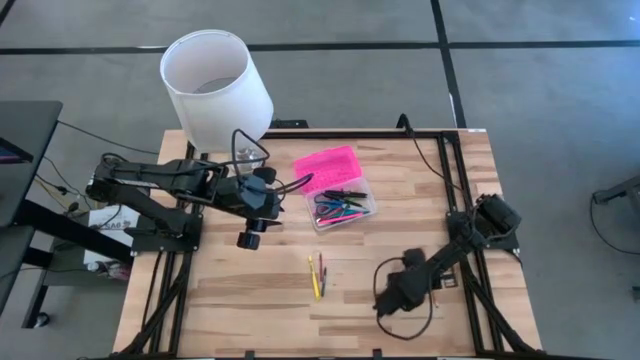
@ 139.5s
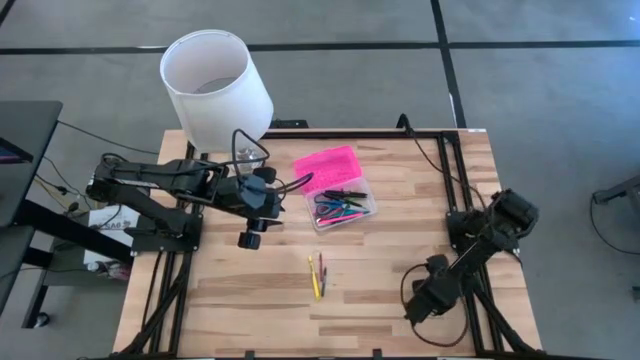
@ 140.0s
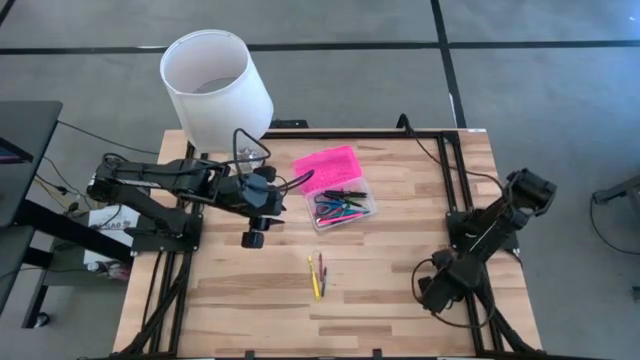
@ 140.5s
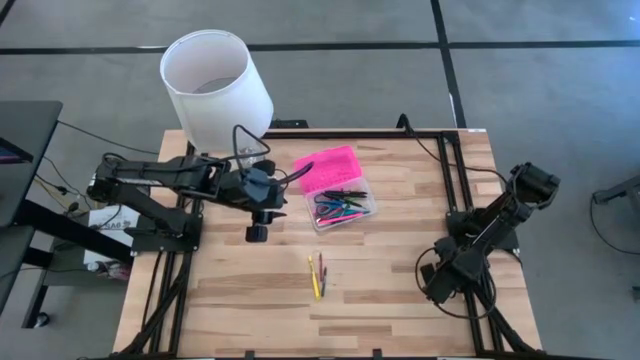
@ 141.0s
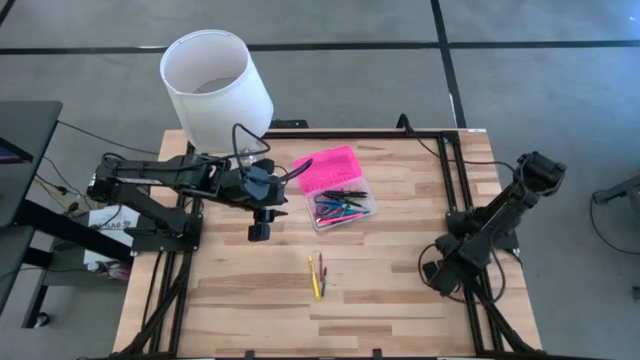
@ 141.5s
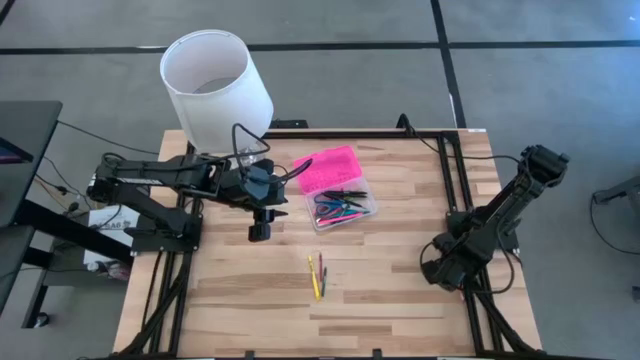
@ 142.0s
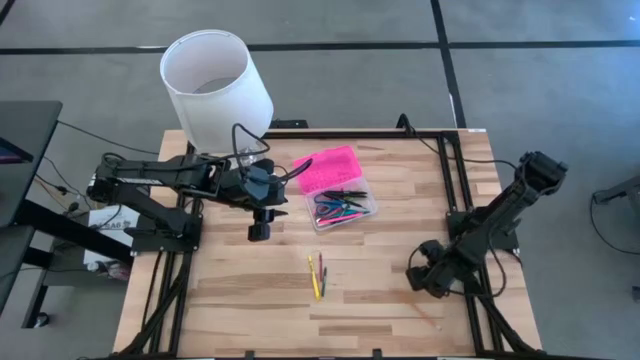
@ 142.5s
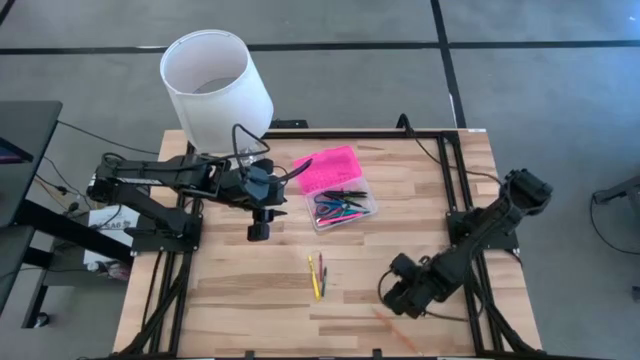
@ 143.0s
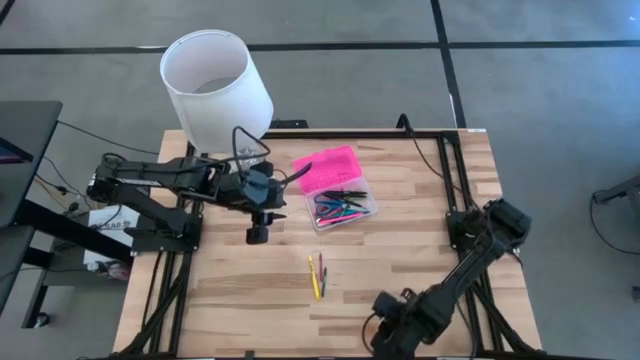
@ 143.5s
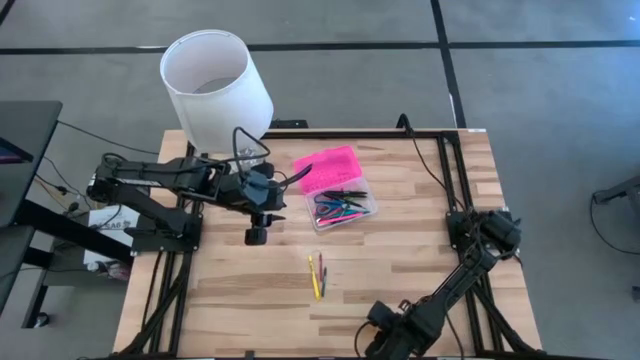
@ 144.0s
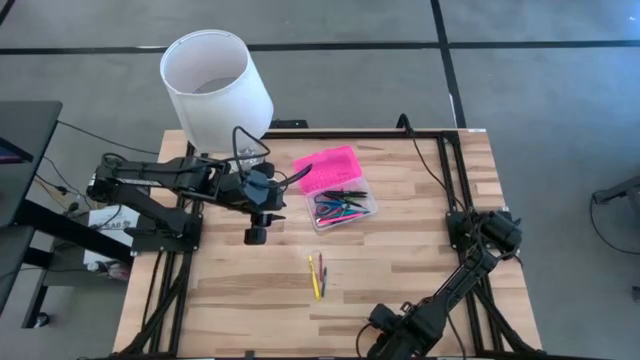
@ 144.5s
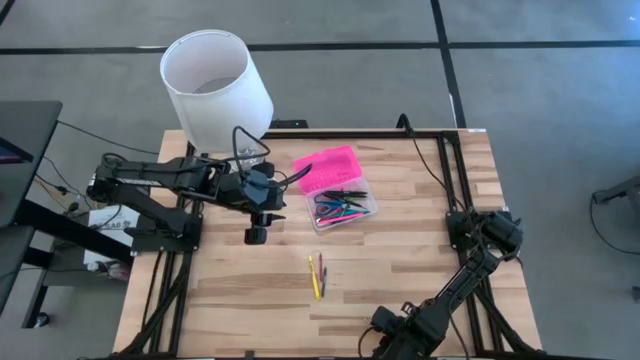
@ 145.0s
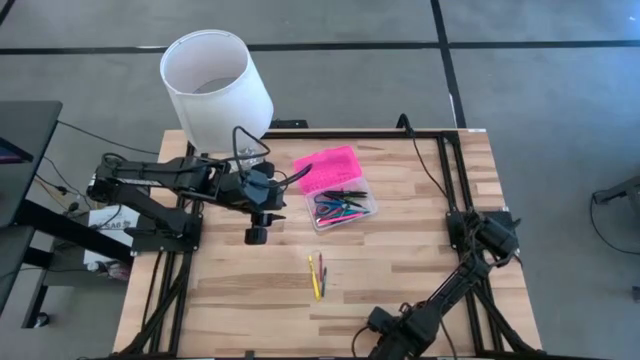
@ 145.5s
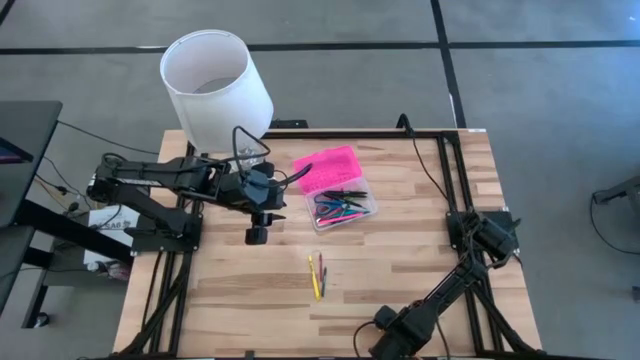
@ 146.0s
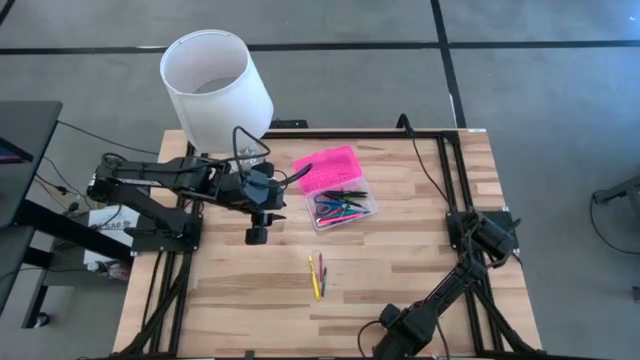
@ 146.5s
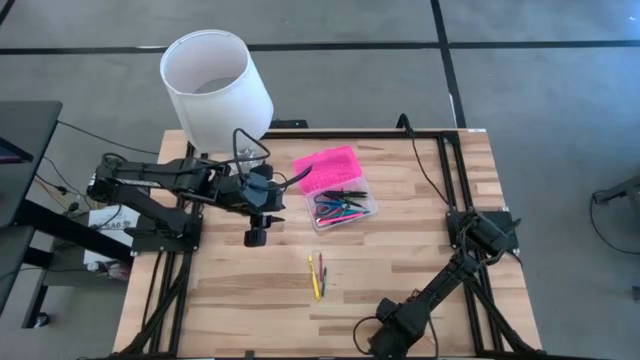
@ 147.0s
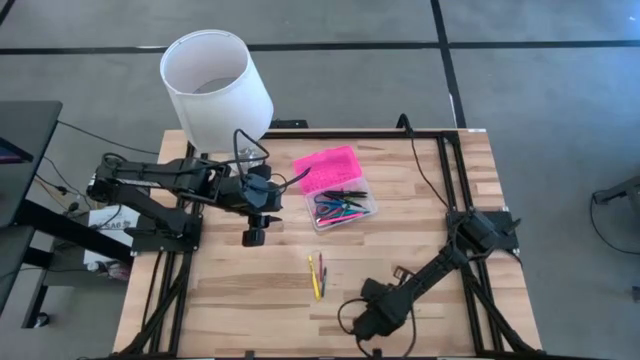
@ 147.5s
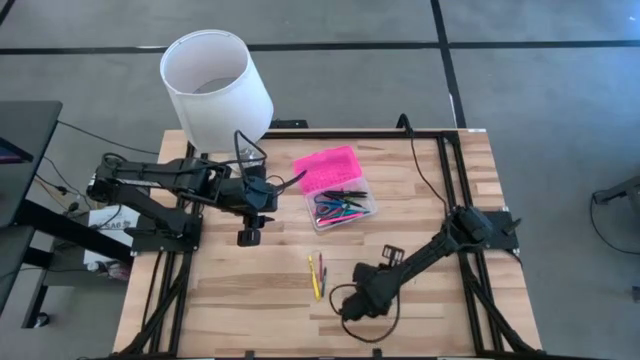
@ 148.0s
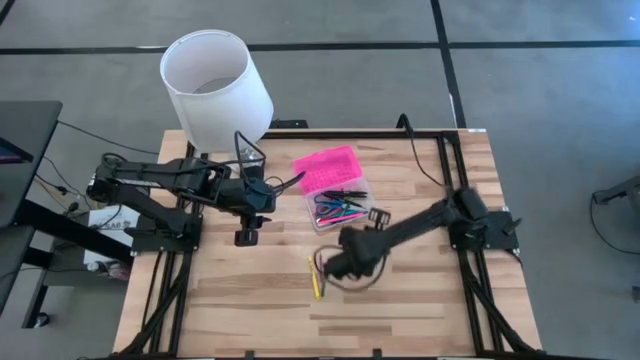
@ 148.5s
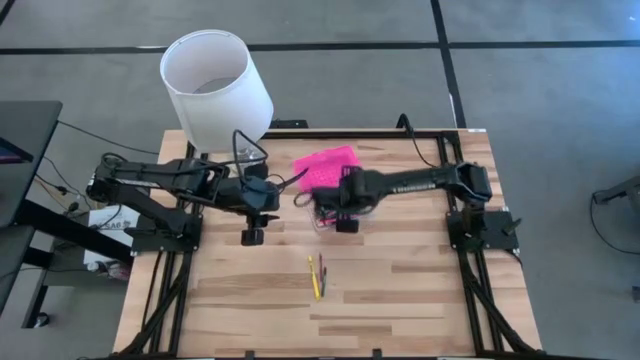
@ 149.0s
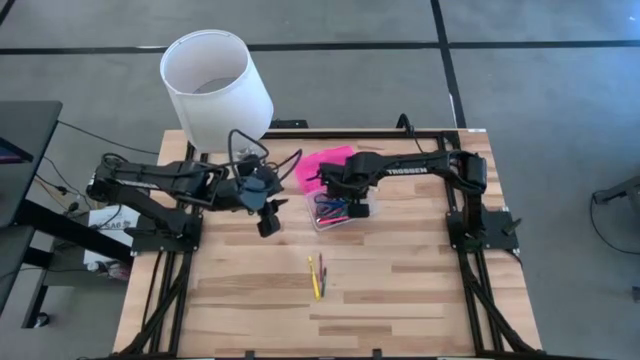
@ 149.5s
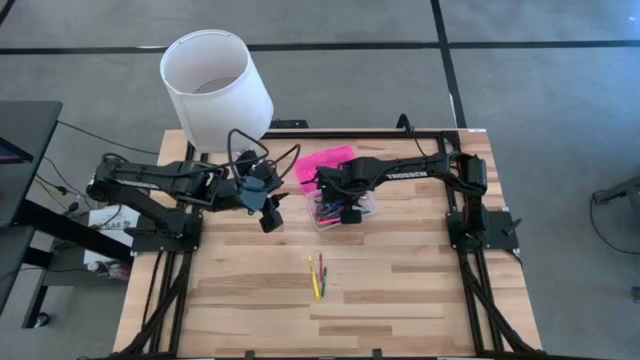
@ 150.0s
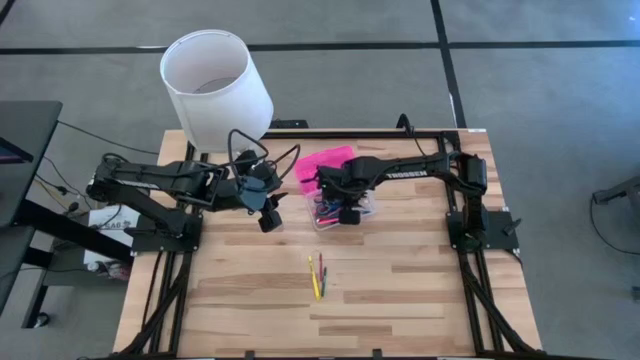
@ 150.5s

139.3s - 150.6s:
Task: Pick & place school supplies into a supply box
Put the yellow pencil into the pink supply box

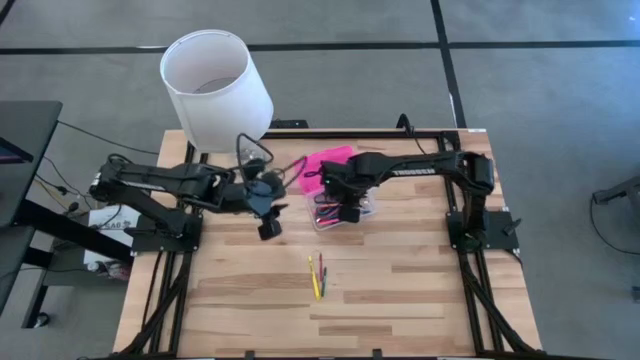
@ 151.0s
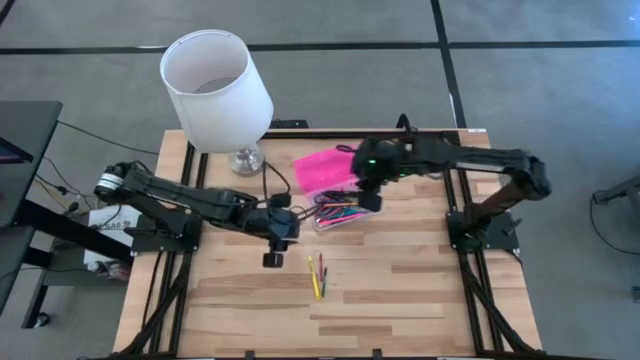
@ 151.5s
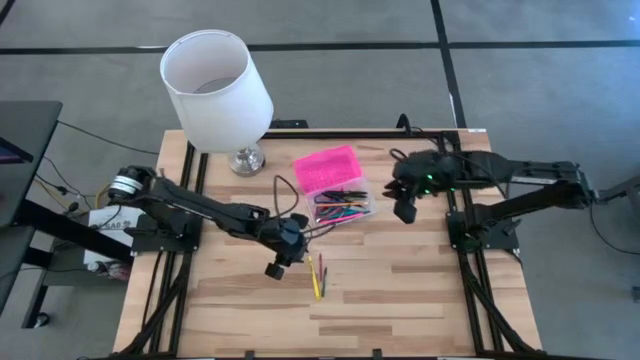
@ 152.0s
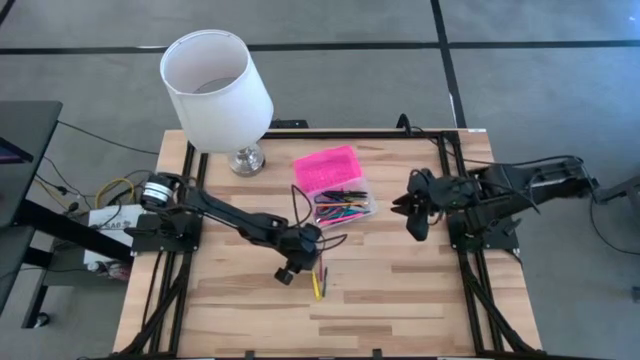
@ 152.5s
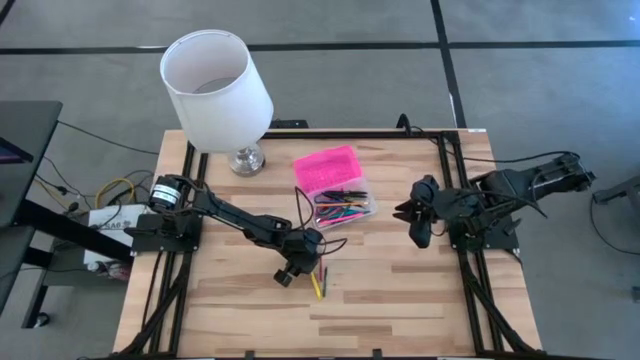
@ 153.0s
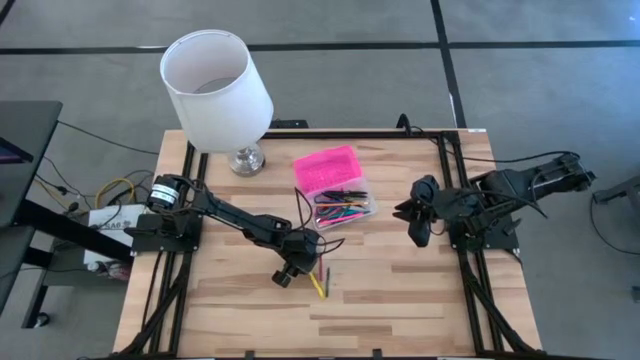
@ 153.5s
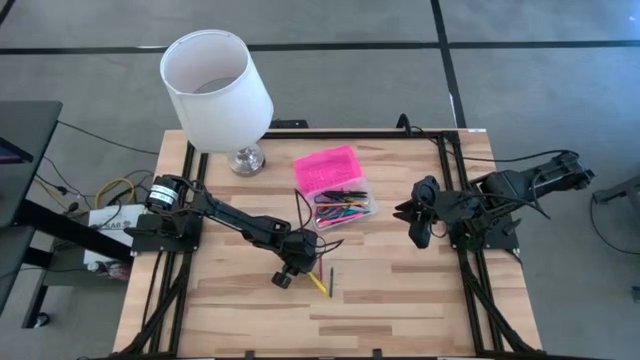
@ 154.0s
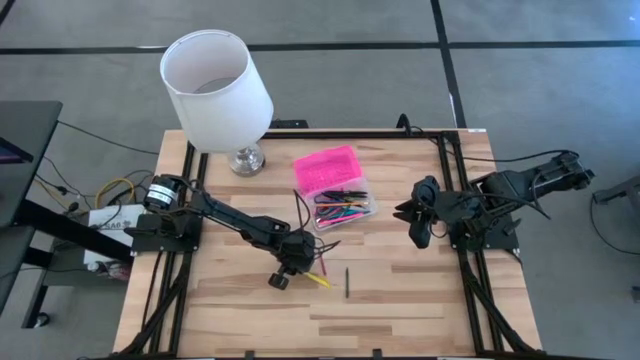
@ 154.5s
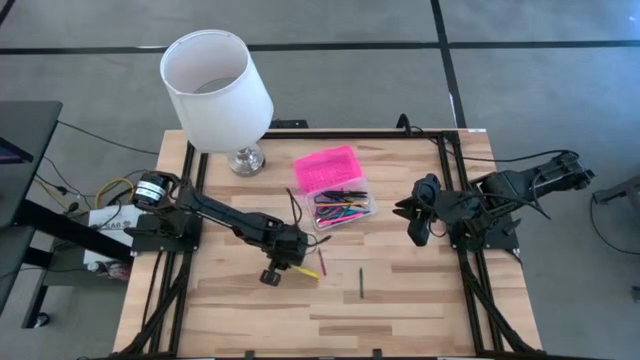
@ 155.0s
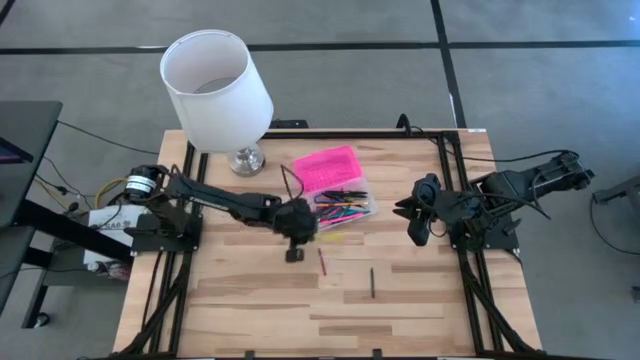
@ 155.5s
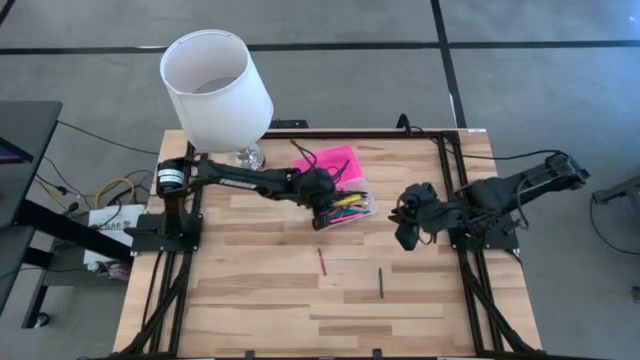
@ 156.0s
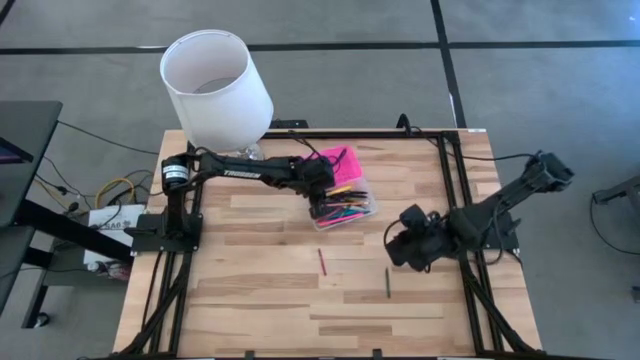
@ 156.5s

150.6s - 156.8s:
Put the yellow pen into the pink supply box

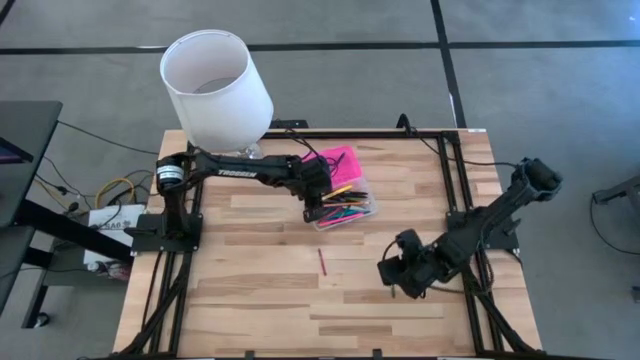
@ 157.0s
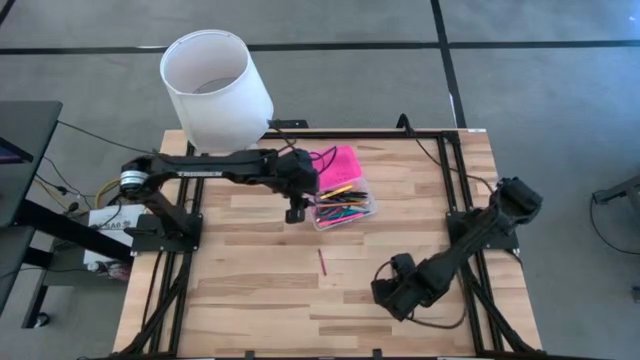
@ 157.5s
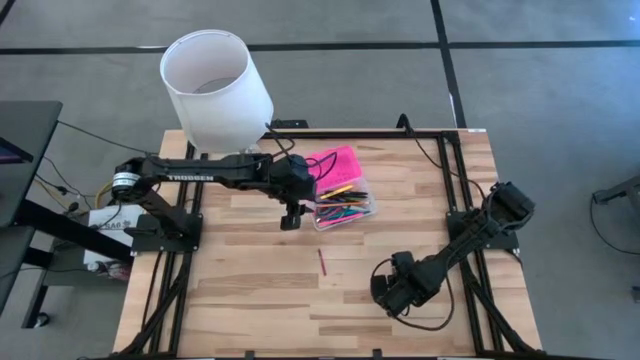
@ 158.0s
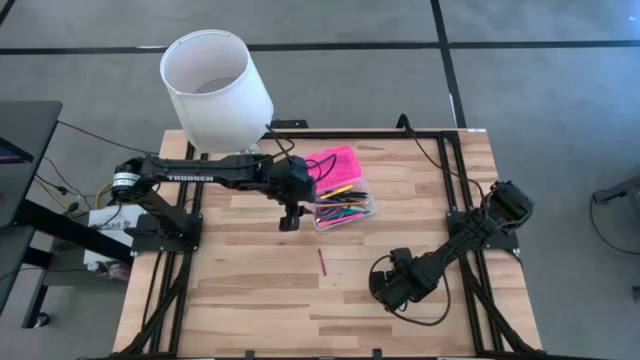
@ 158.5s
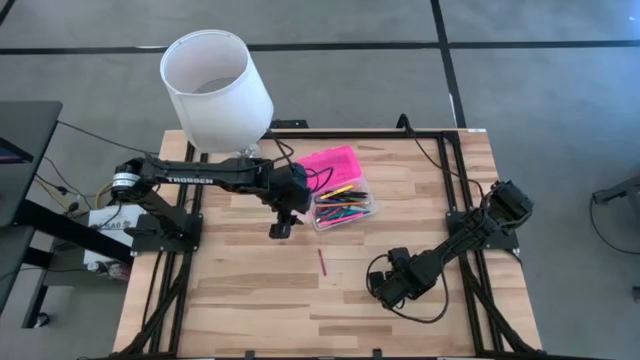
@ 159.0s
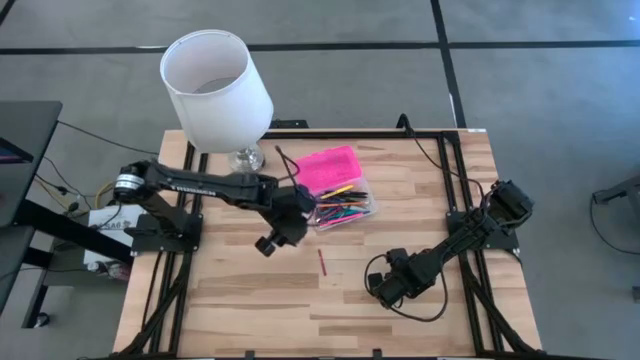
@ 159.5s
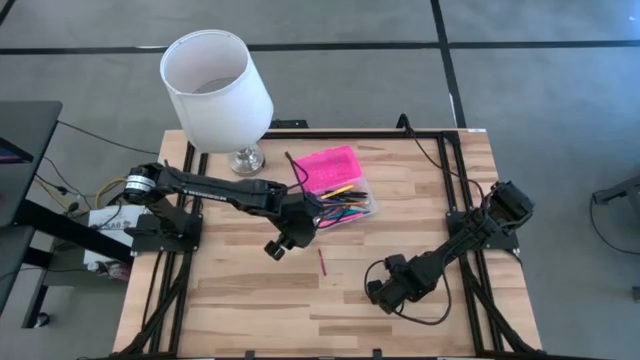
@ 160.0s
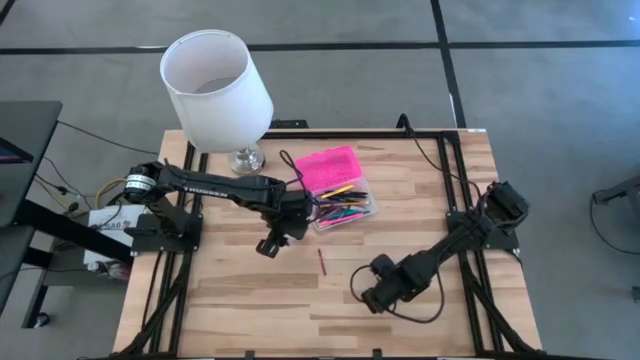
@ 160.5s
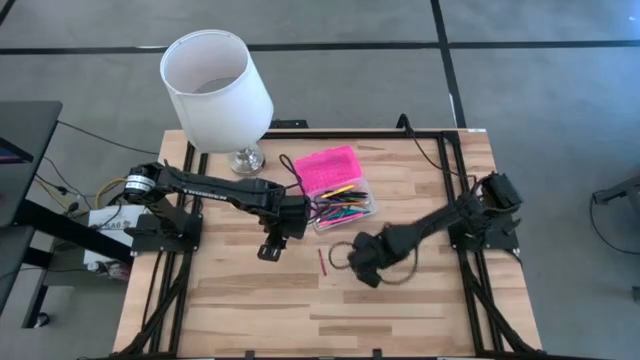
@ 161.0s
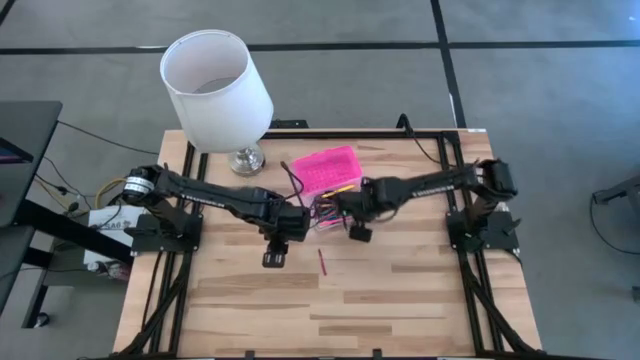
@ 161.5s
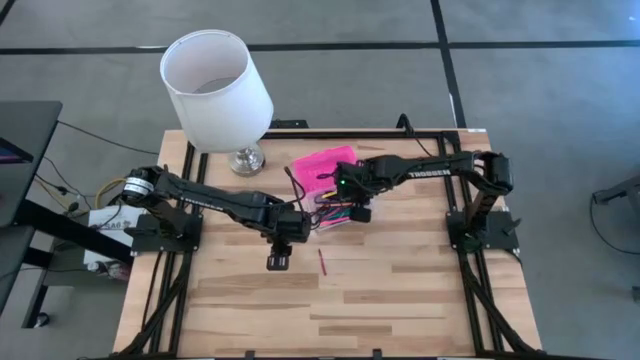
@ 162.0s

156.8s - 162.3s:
Put the green crayon into the pink supply box
